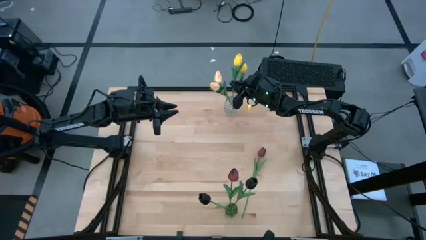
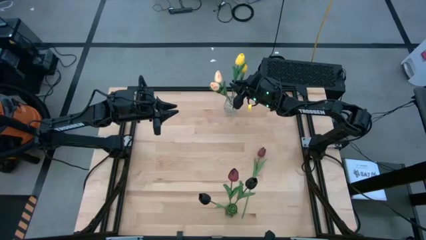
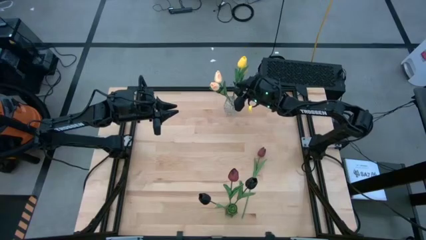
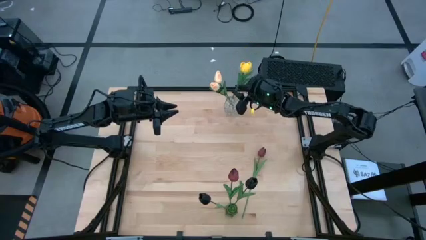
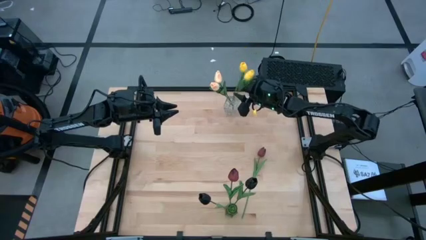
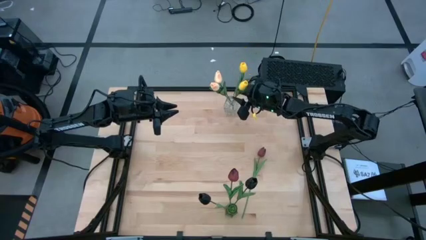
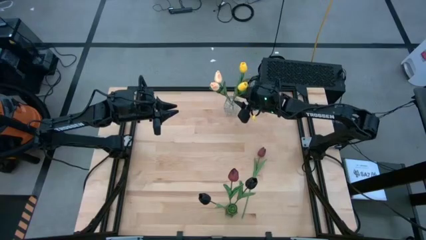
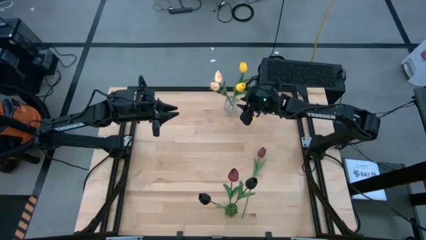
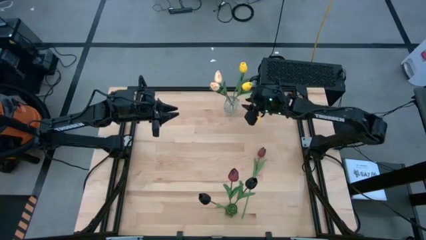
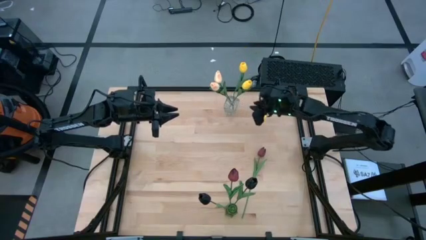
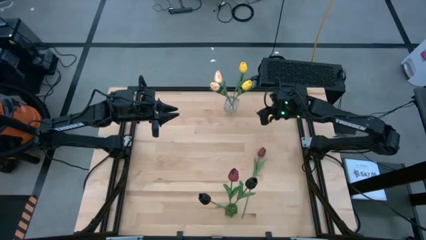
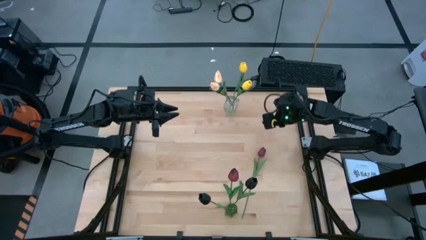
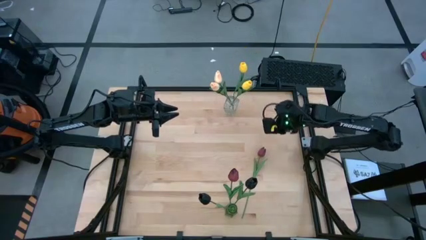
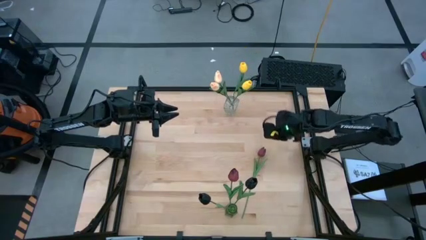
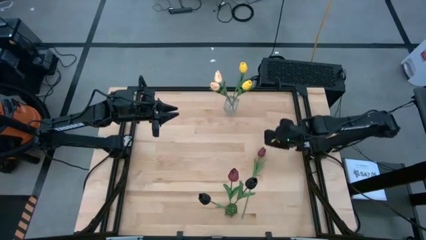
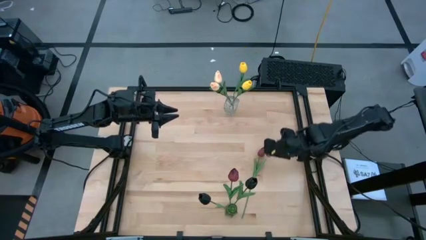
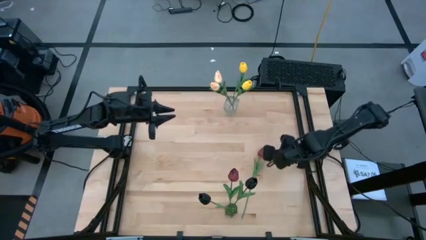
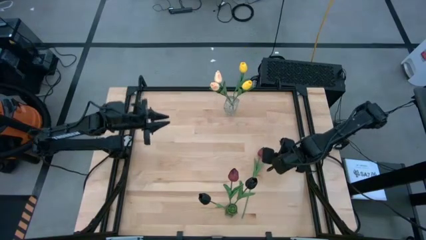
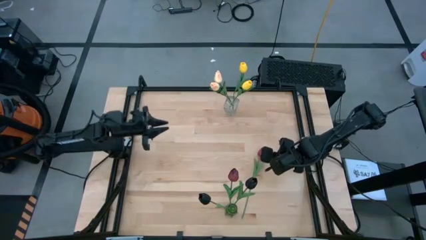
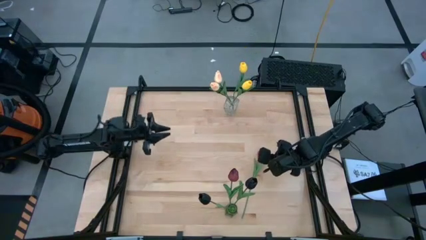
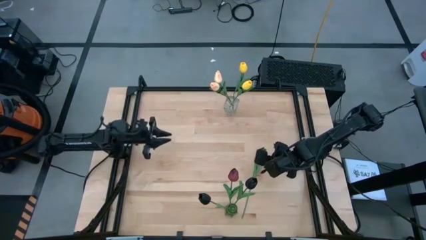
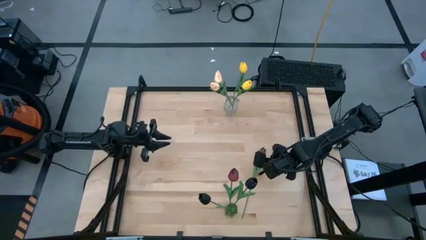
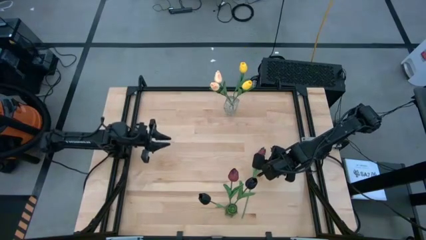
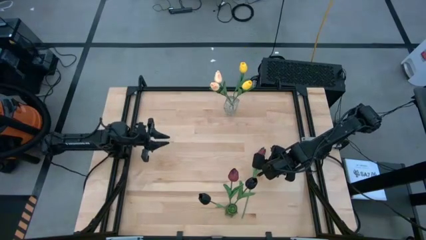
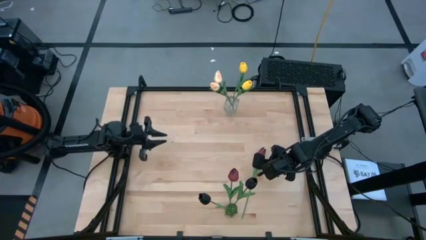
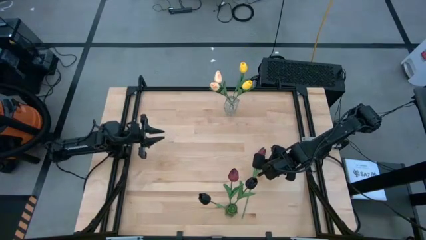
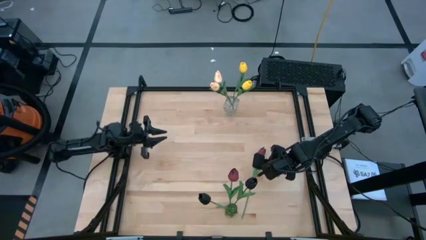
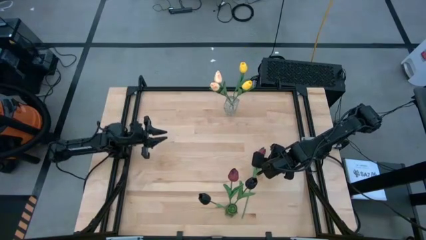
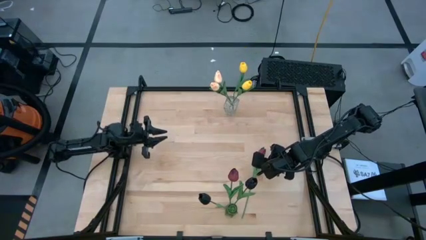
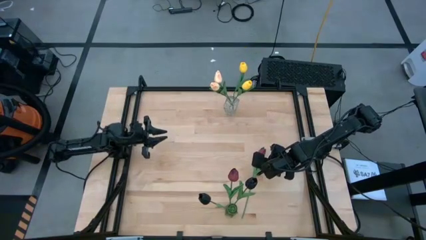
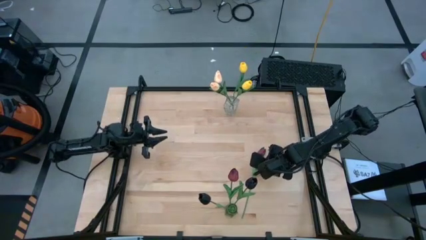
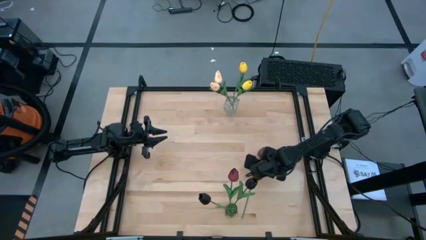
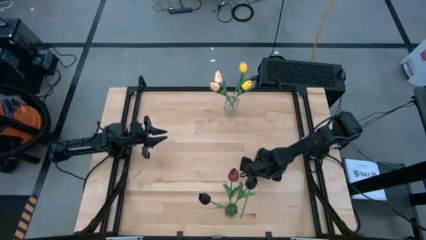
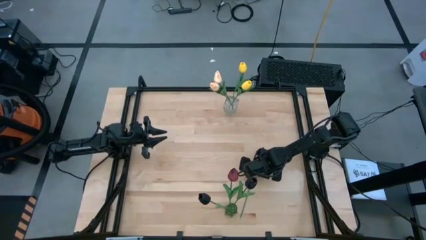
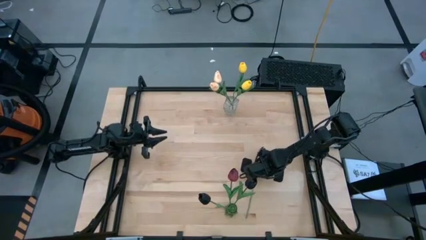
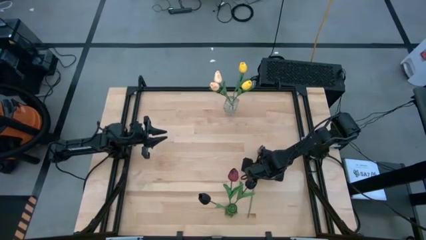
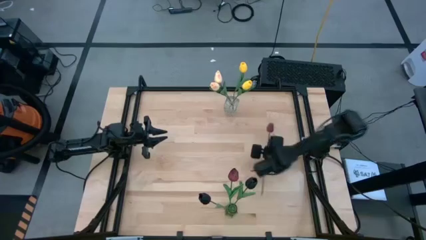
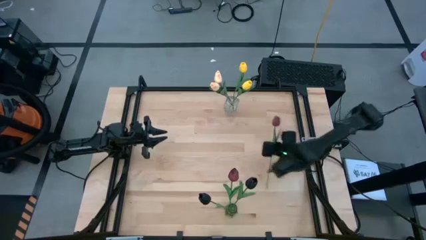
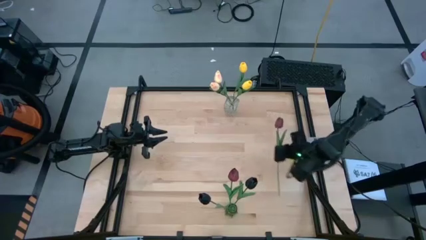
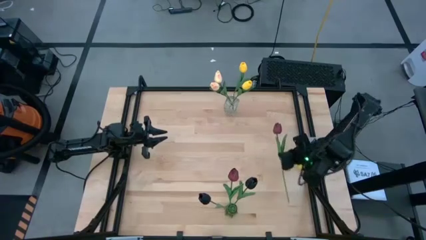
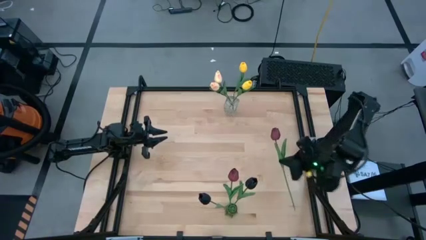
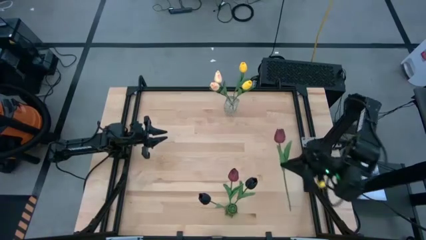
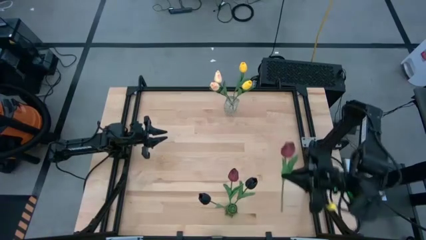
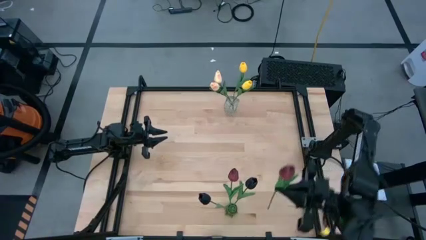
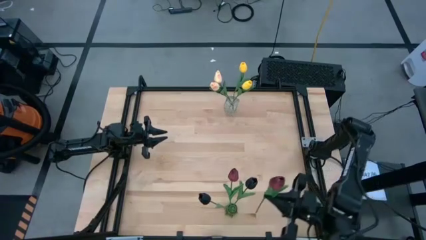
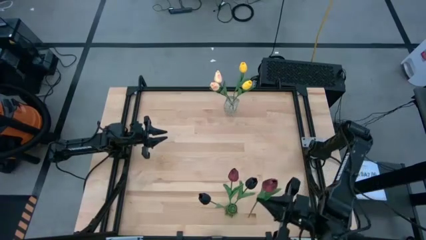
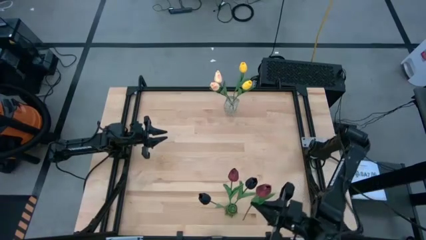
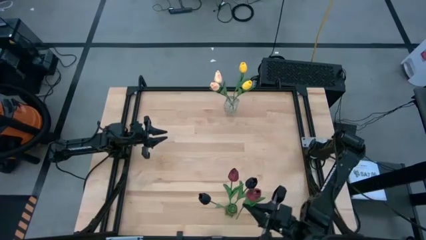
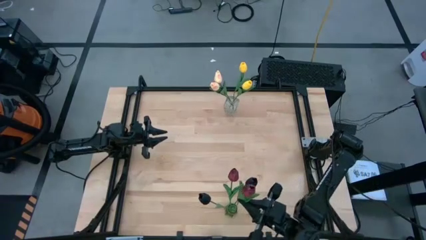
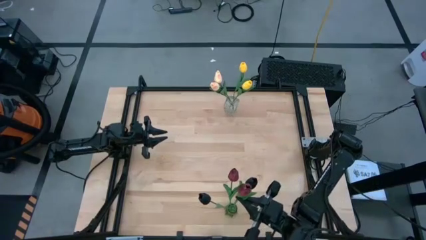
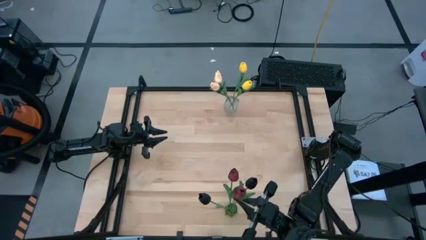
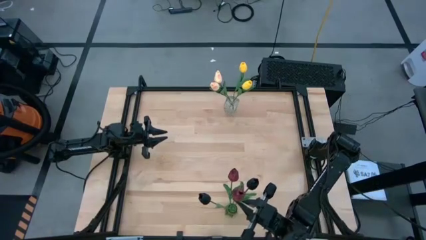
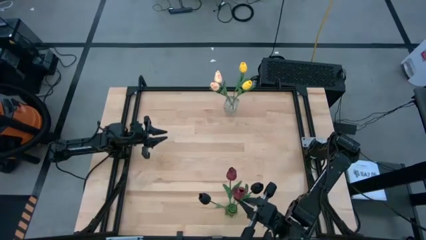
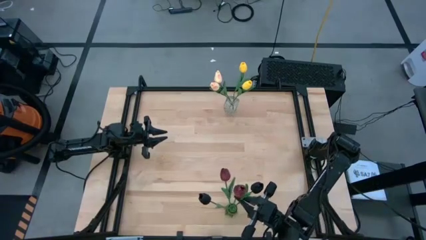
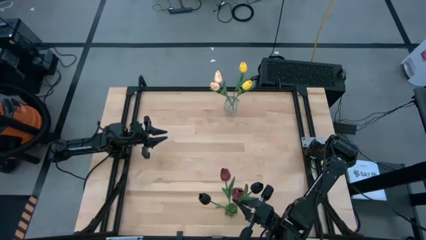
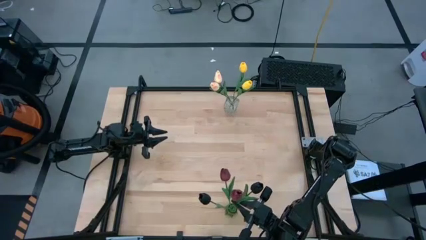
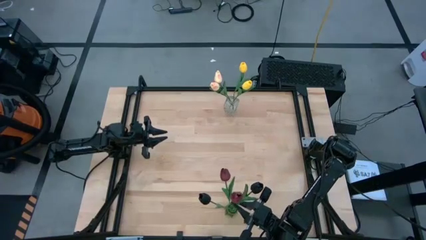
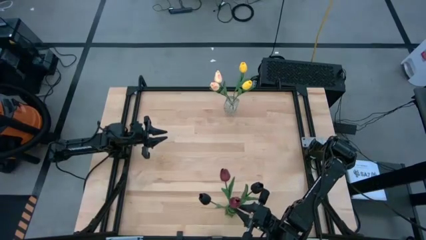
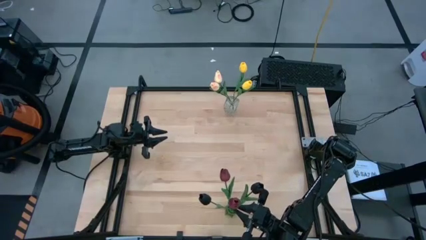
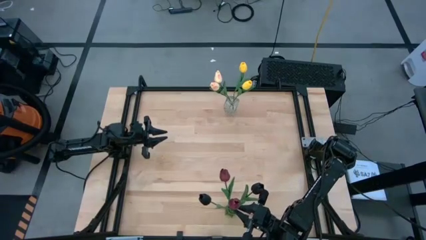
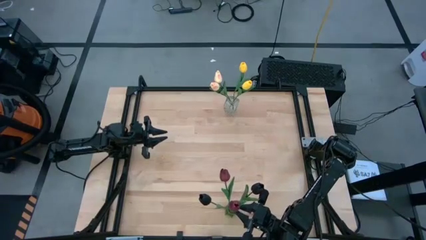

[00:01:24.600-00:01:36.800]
Task: Sort flowers into vase by color
Put the red into the green flower vase

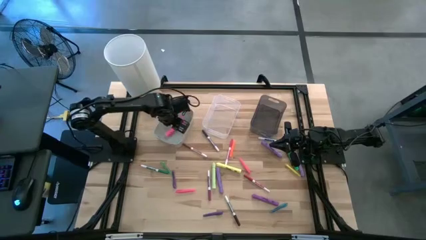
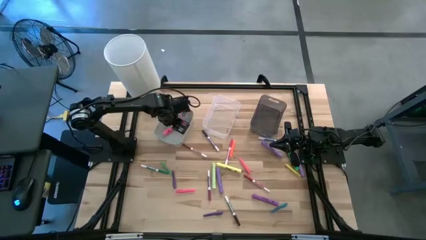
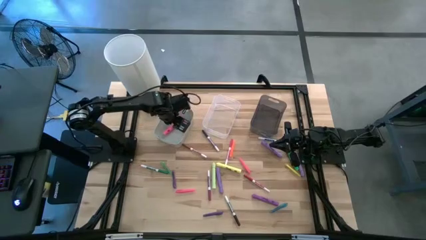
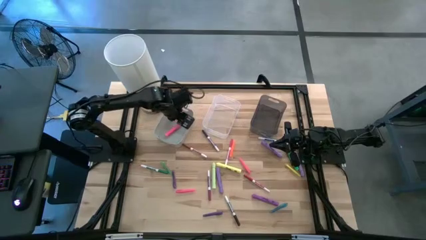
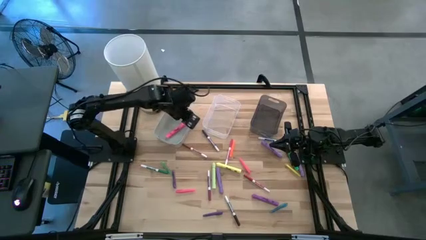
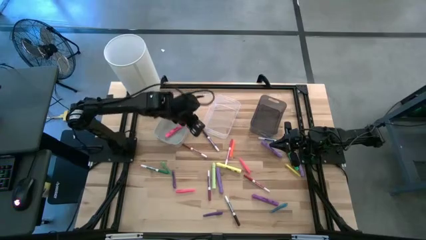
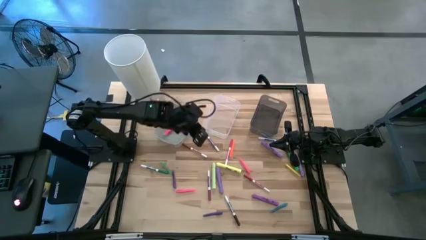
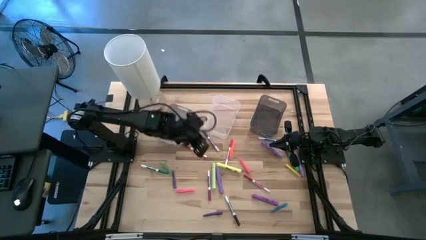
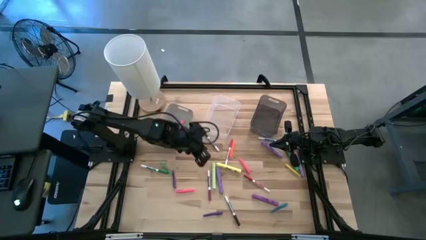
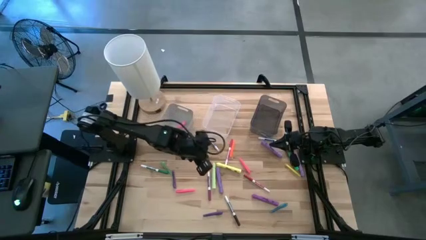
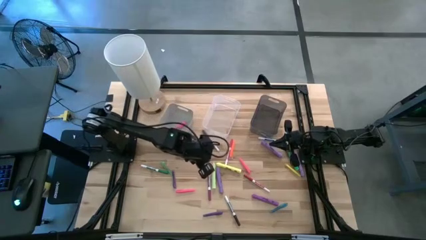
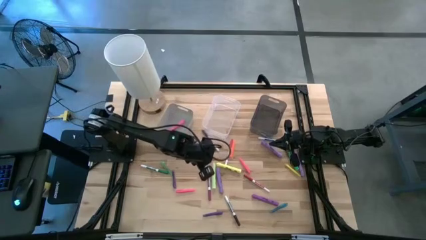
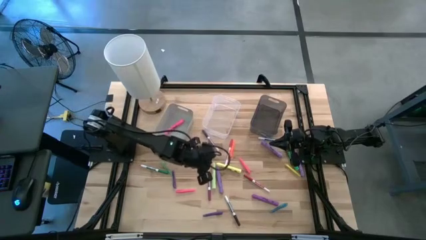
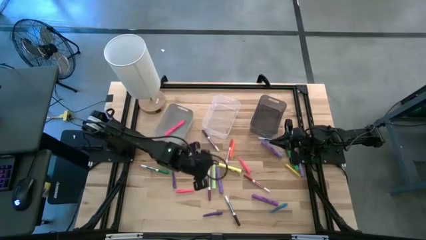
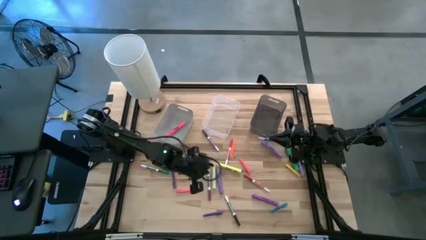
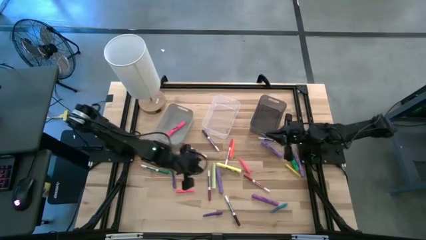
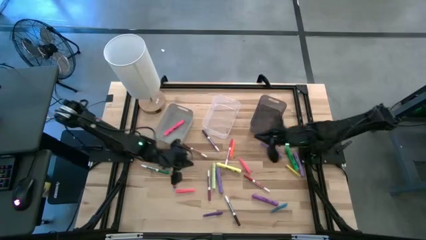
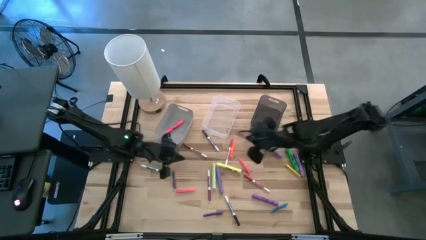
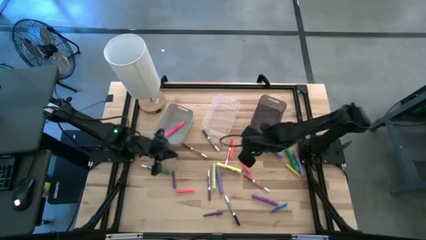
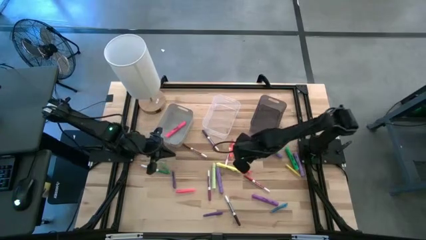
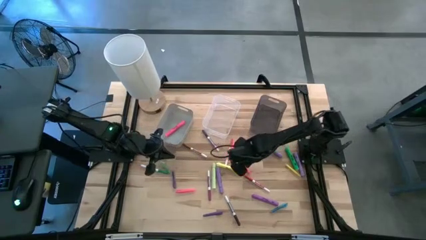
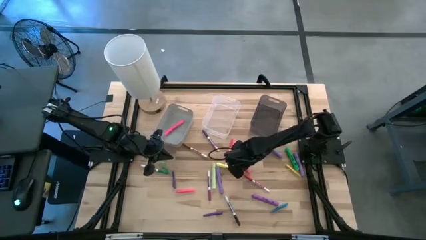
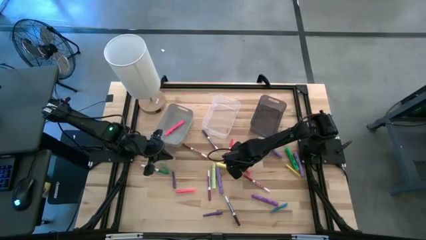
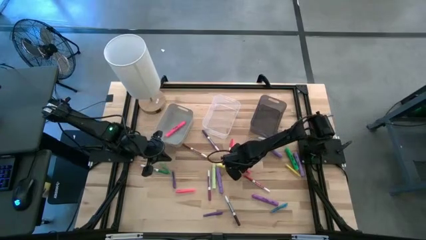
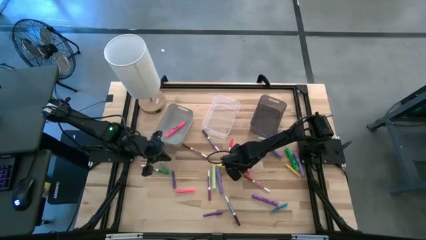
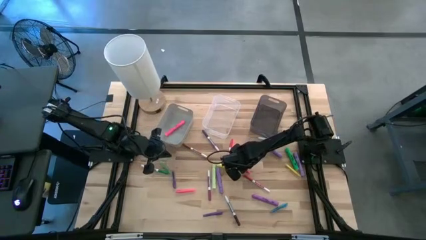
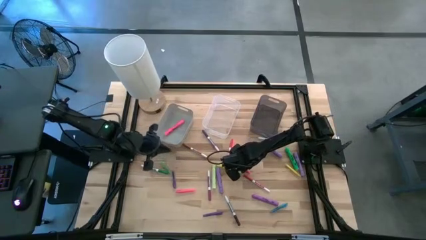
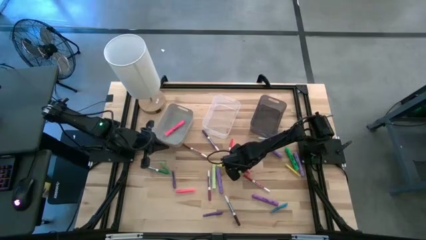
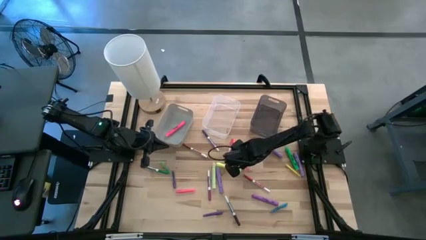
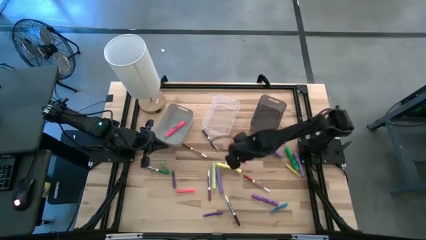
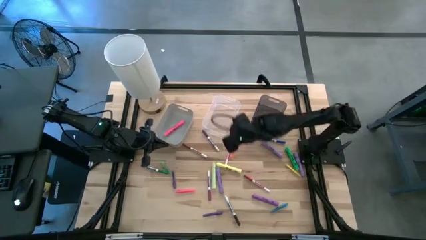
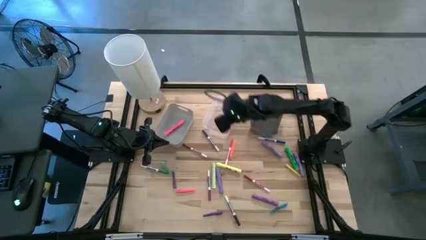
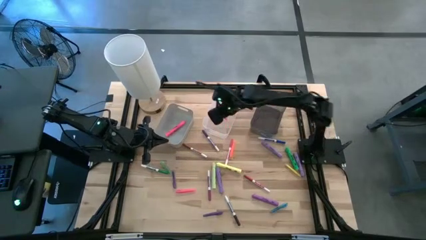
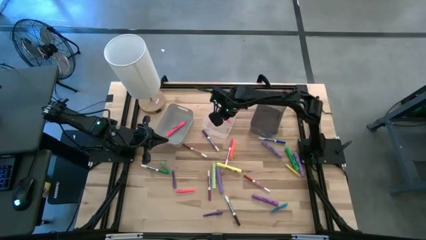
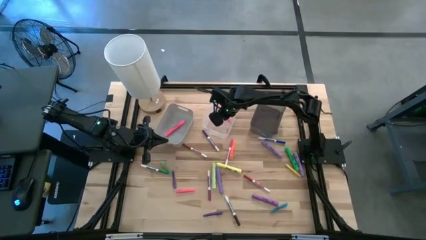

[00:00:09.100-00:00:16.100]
Task: Pick & Place Markers
Put the pink pen into the transparent bin
